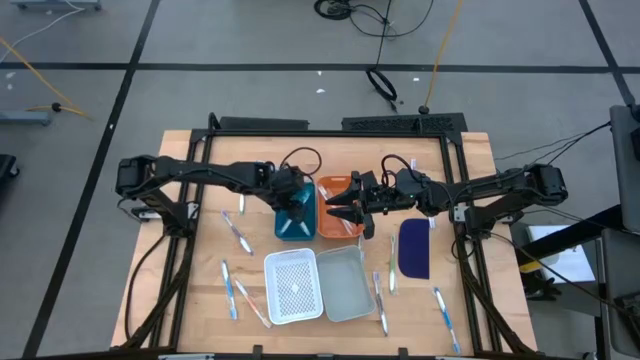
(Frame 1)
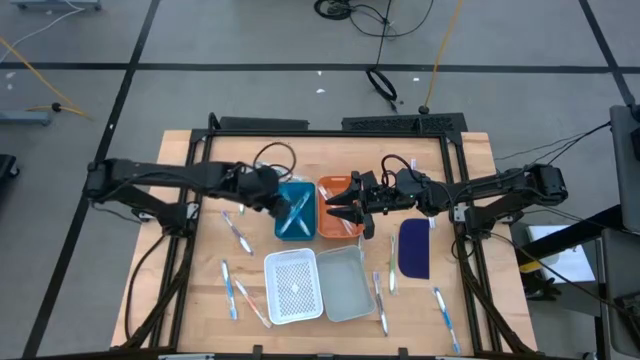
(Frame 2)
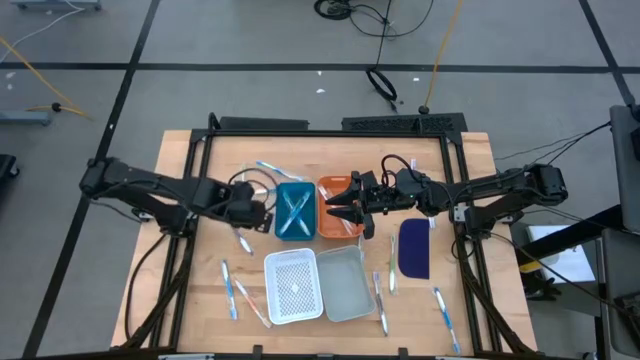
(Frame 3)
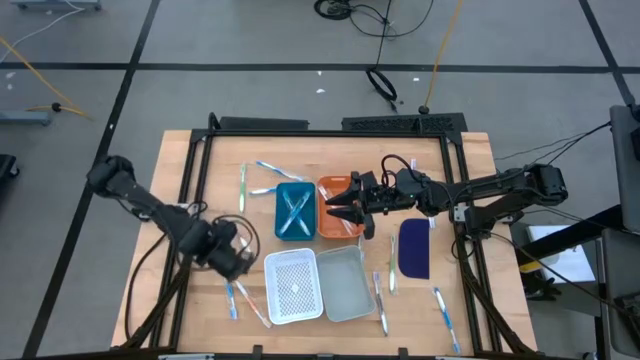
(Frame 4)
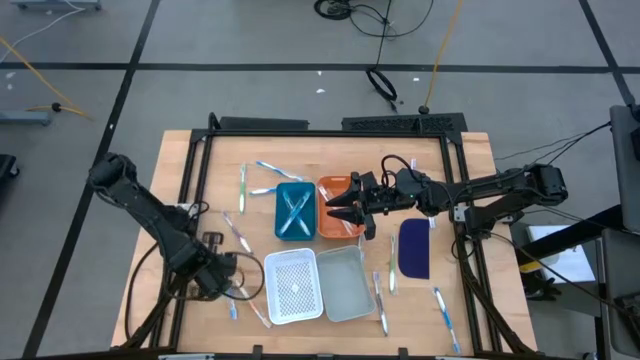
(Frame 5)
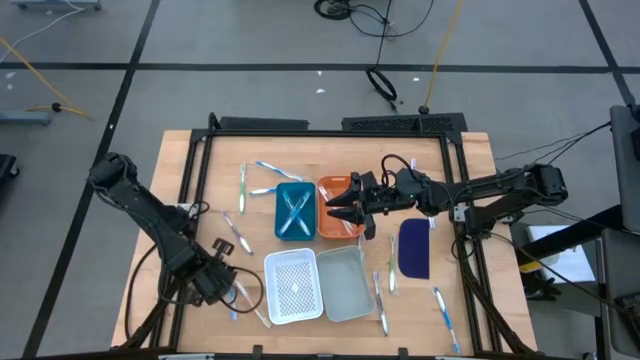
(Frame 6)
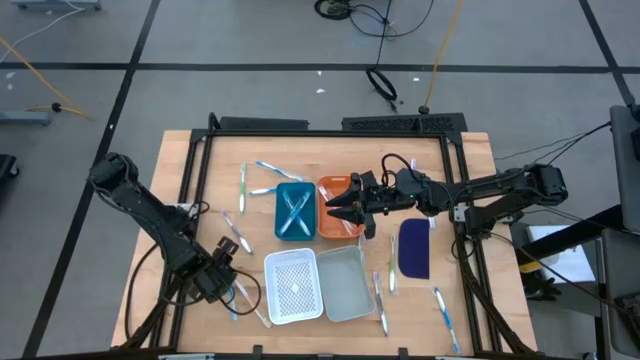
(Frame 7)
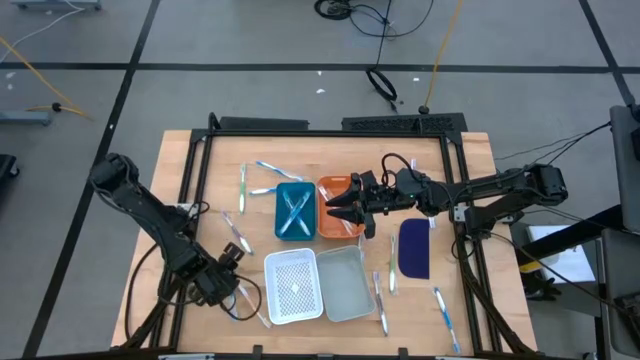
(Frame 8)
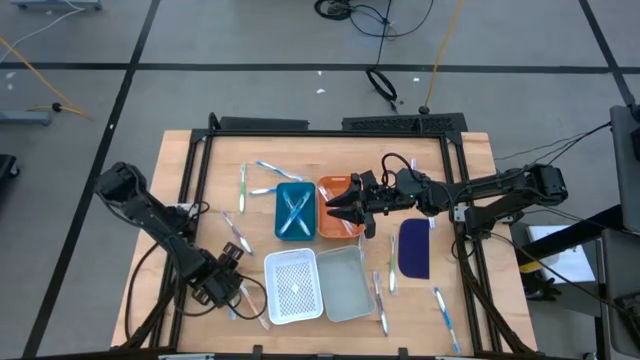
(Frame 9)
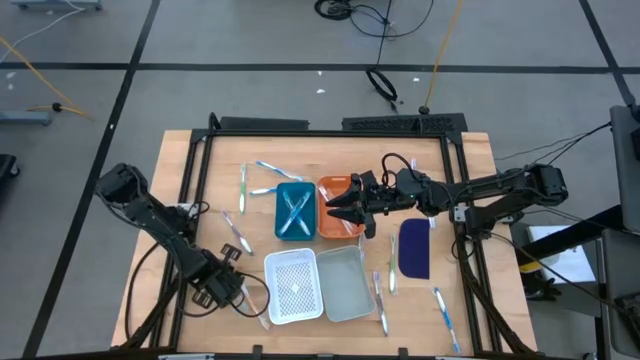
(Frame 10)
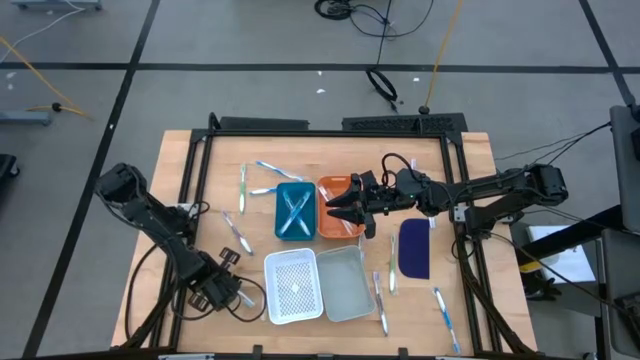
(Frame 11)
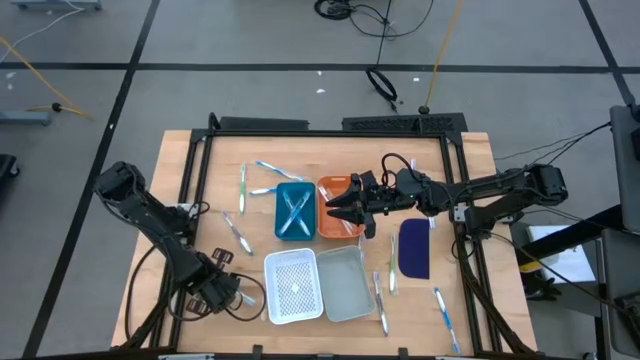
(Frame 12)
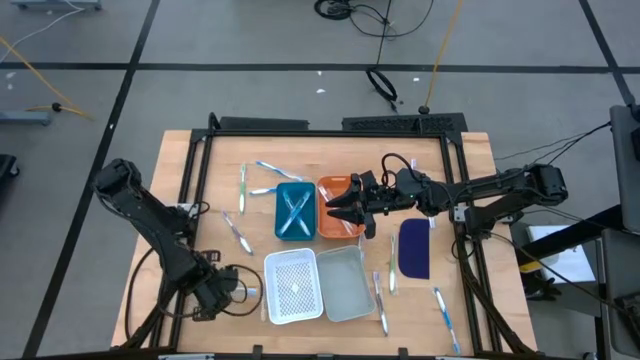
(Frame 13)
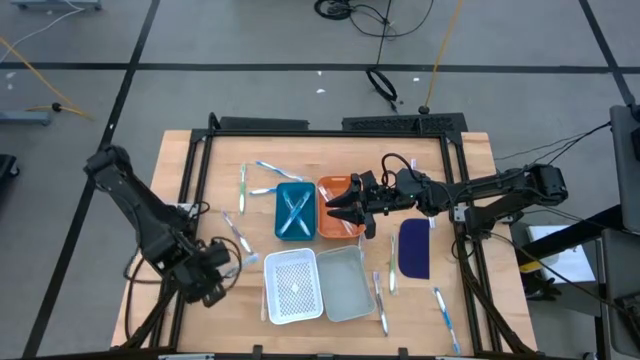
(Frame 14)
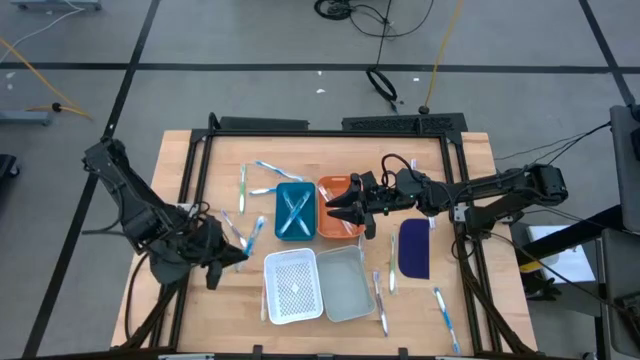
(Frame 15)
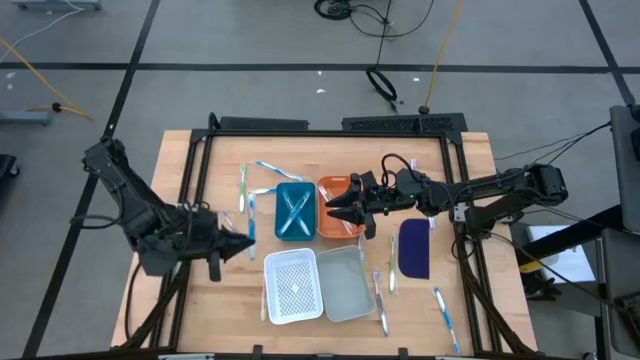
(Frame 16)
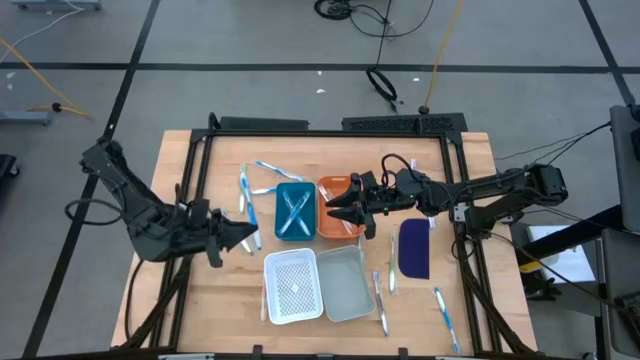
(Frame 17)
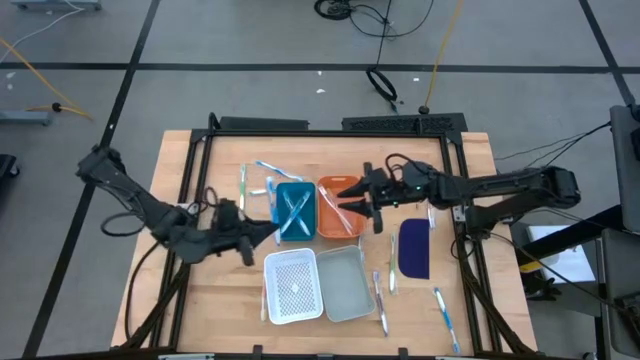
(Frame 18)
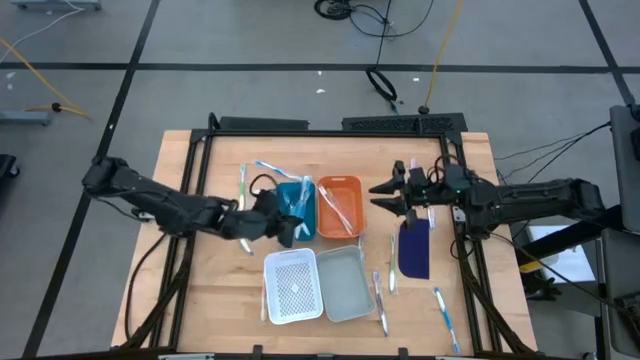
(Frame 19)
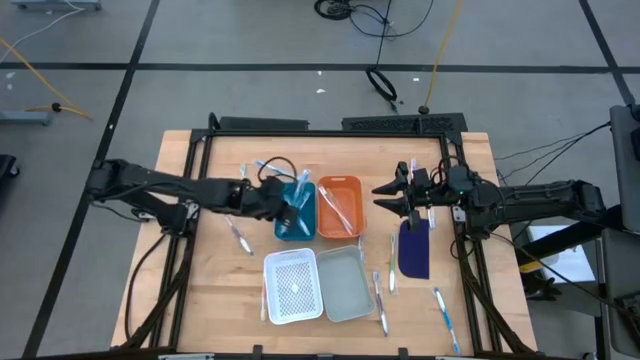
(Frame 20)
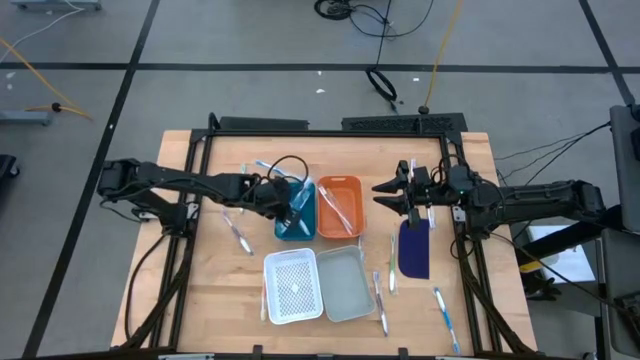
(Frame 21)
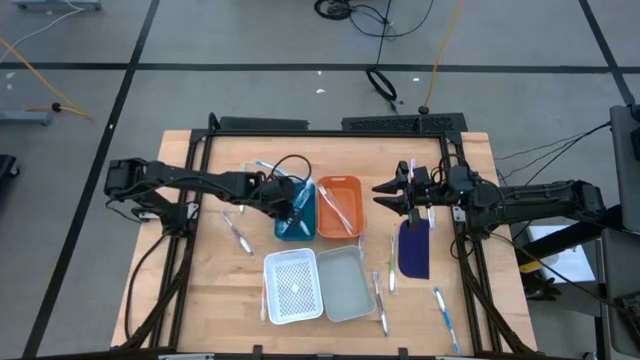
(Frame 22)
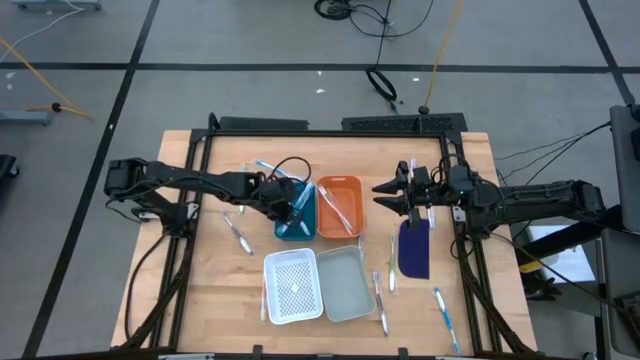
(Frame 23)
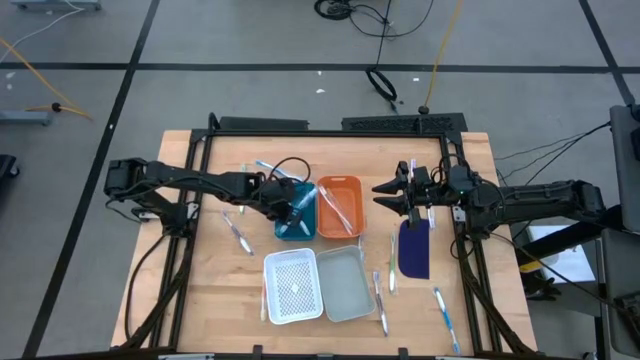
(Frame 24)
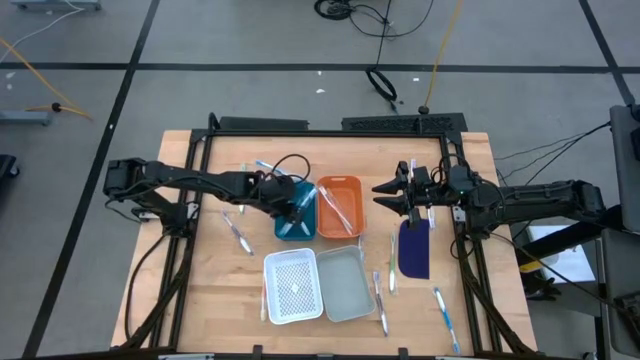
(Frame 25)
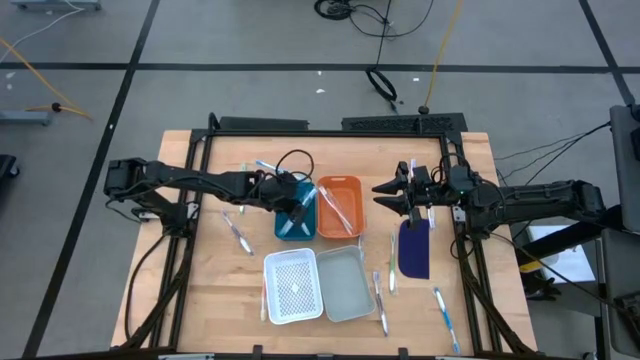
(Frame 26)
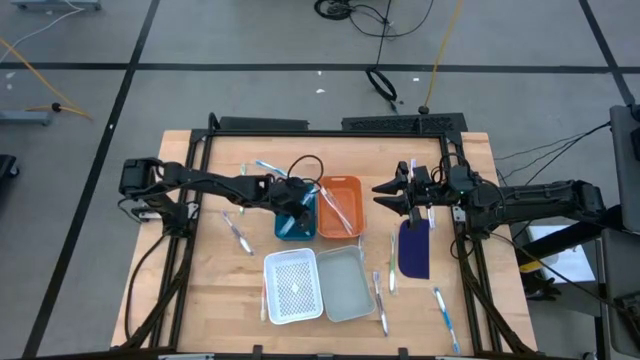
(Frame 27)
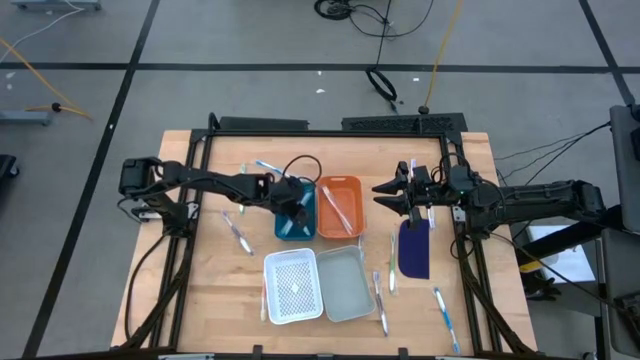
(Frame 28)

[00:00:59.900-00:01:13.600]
Task: Pick & Place Toothbrushes
Put the blue toothbrush into the blue bin

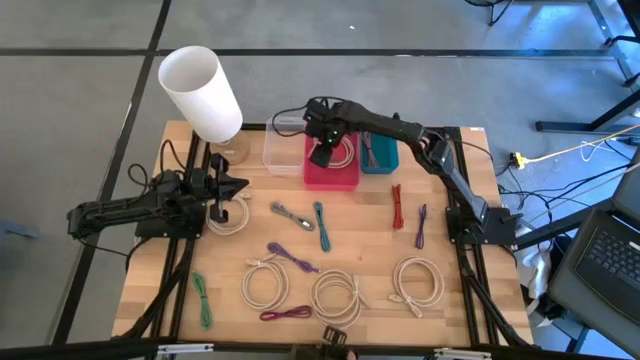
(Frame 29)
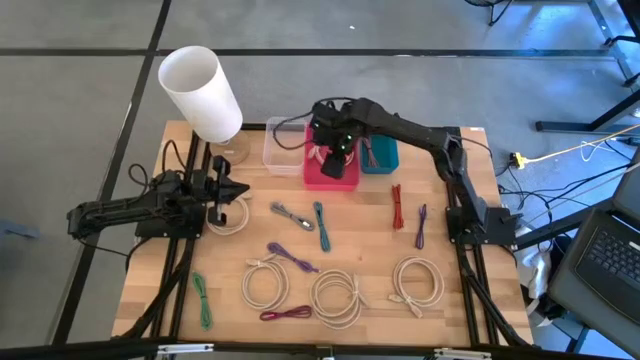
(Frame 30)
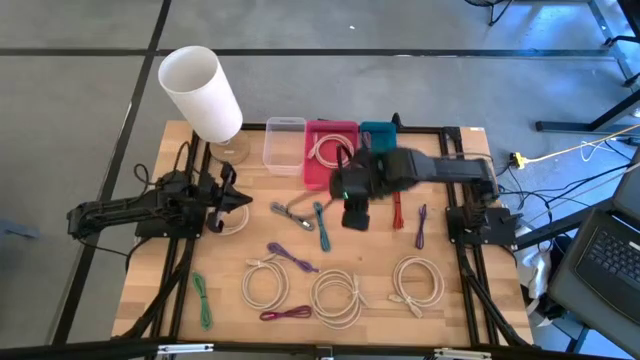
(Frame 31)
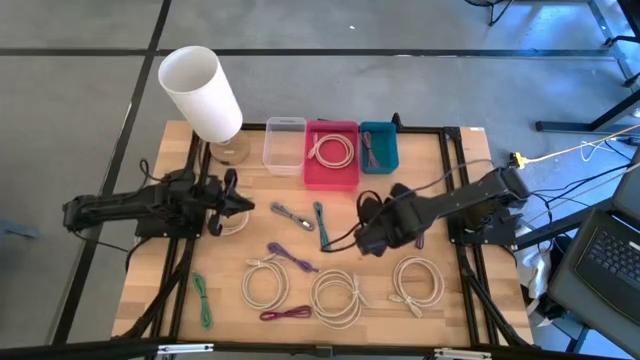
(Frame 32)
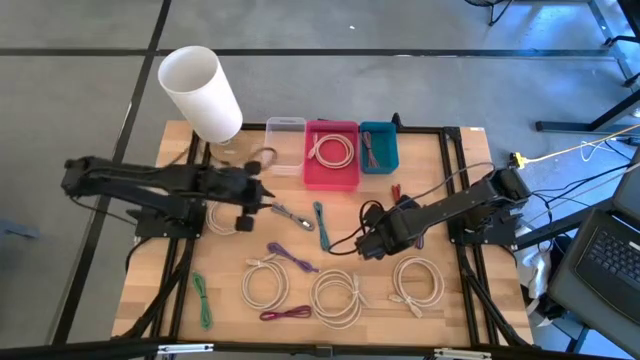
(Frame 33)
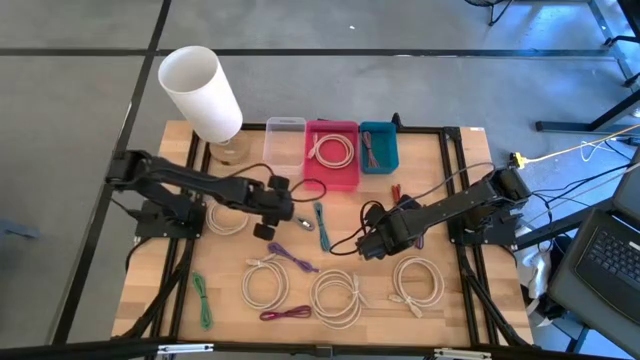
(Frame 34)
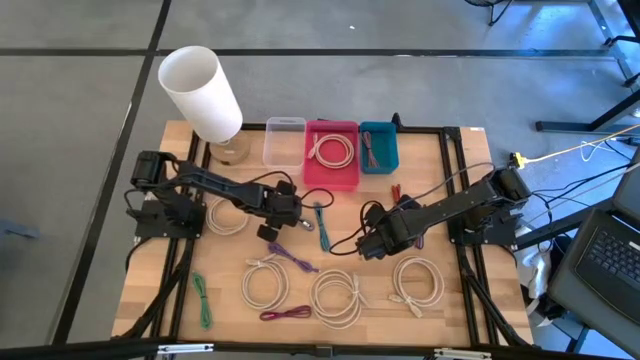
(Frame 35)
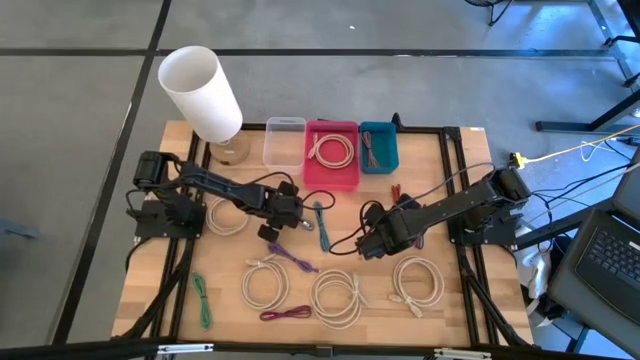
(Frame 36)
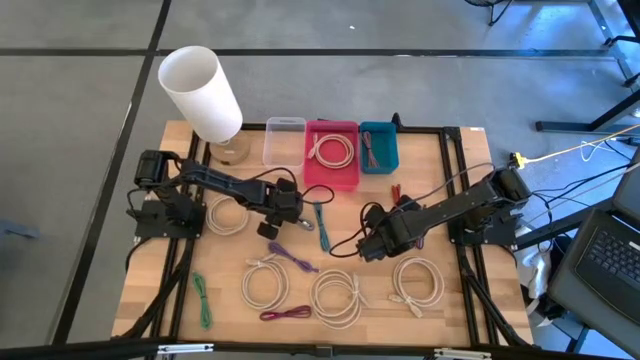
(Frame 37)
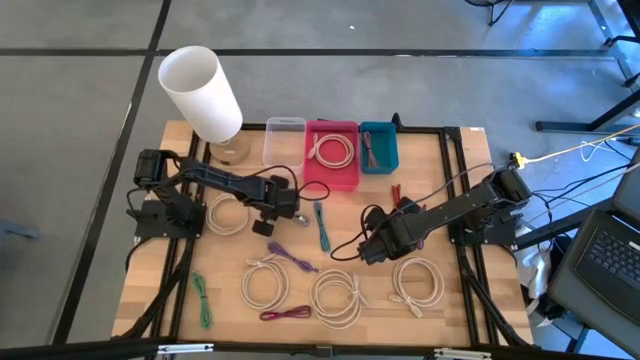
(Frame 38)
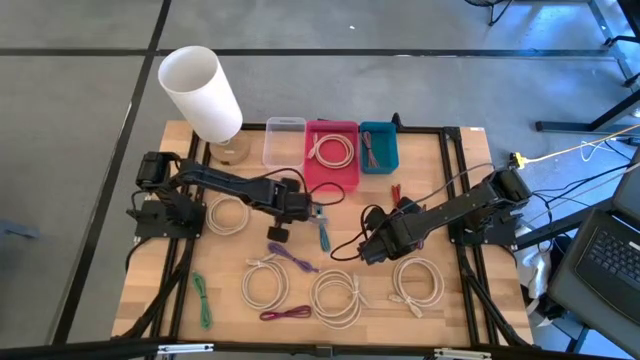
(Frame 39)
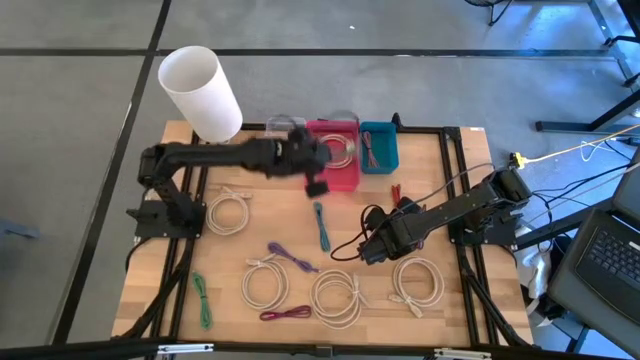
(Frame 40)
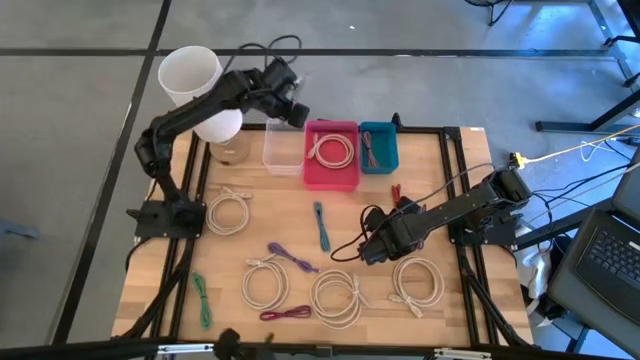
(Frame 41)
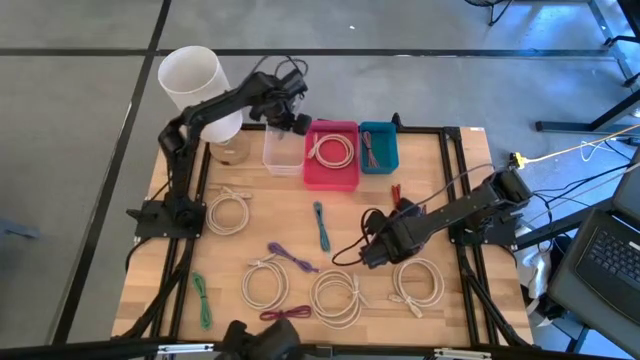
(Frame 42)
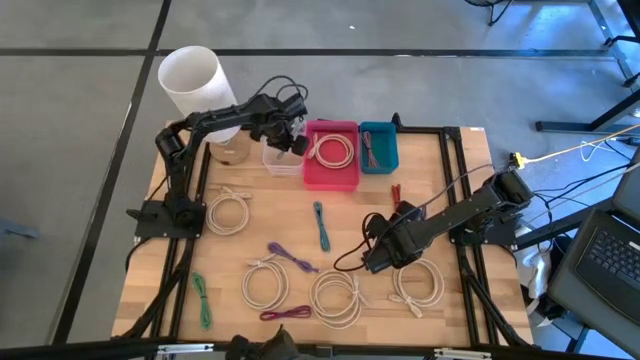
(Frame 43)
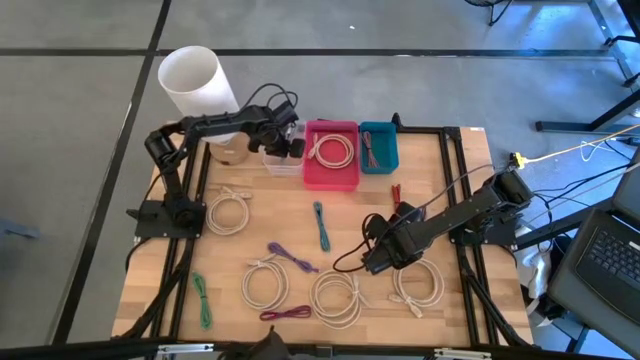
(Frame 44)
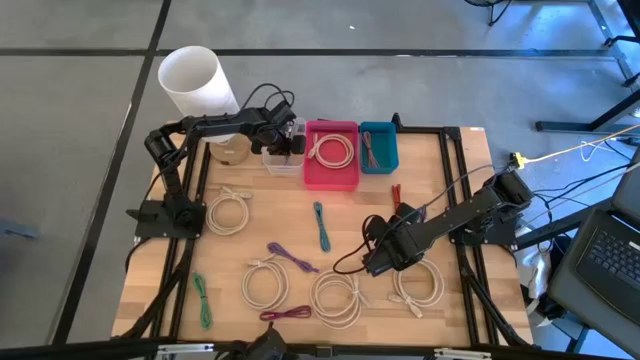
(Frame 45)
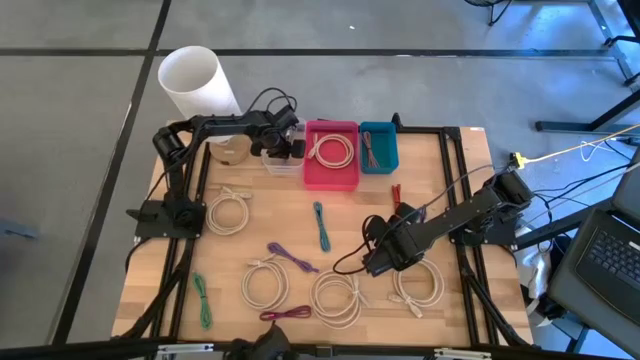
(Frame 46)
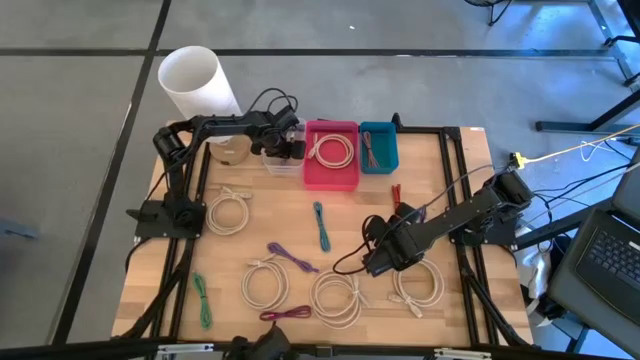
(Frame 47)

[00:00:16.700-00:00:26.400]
Task: Pick & Place USB Port
Put the white and black charger cable into the white bin
